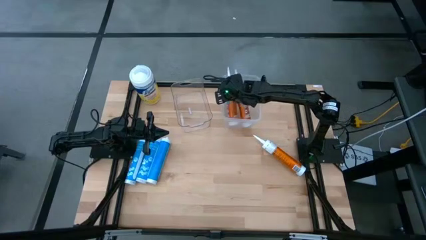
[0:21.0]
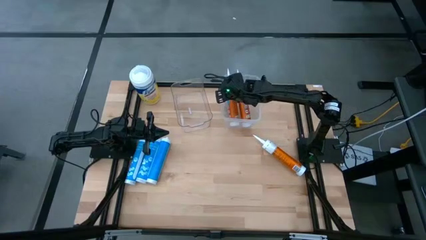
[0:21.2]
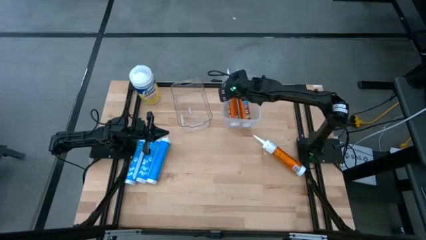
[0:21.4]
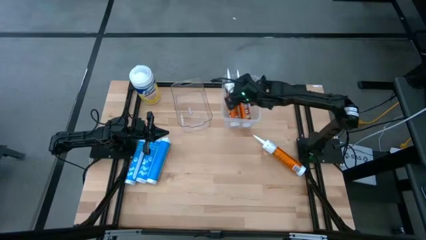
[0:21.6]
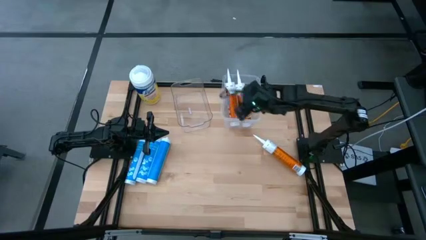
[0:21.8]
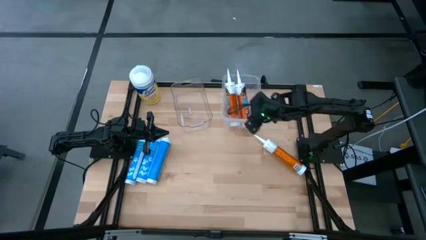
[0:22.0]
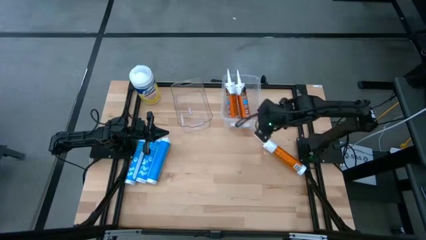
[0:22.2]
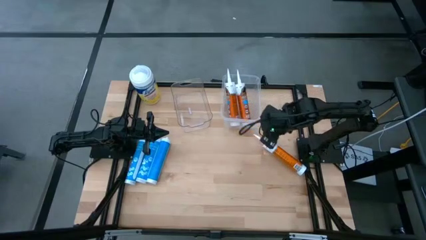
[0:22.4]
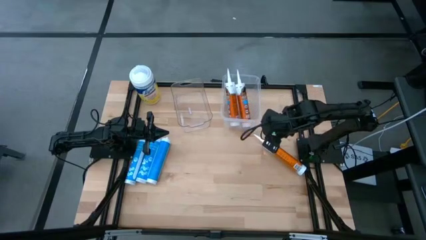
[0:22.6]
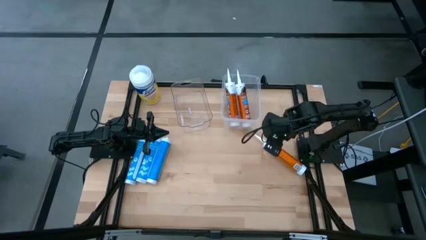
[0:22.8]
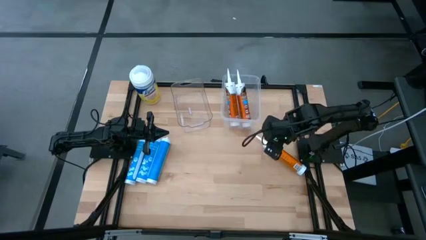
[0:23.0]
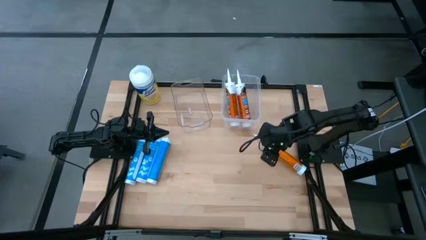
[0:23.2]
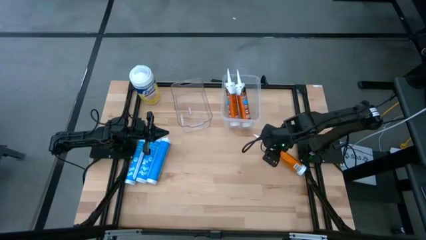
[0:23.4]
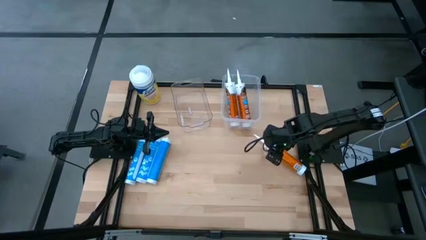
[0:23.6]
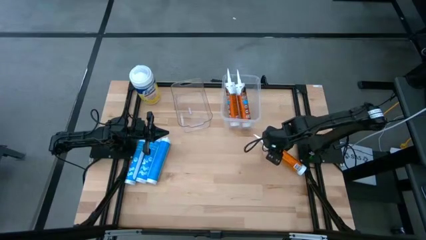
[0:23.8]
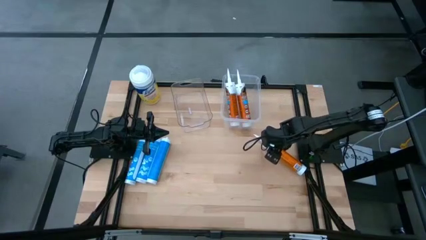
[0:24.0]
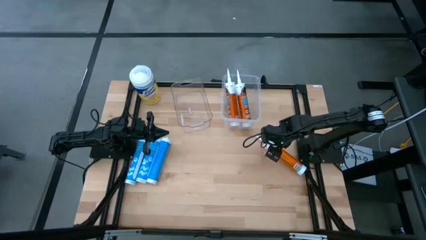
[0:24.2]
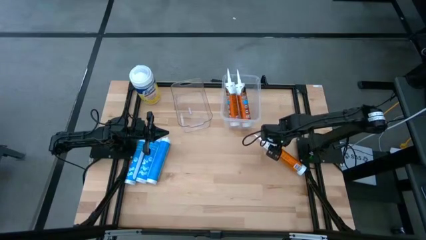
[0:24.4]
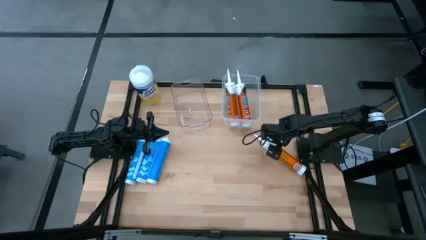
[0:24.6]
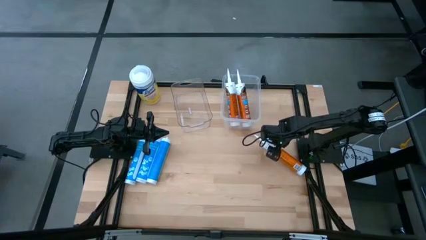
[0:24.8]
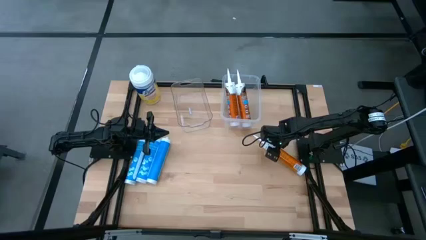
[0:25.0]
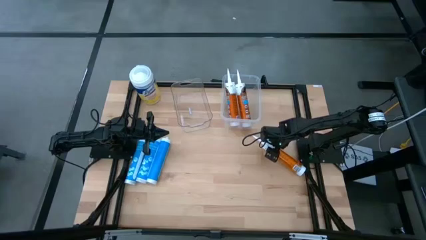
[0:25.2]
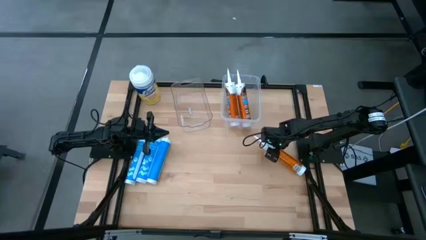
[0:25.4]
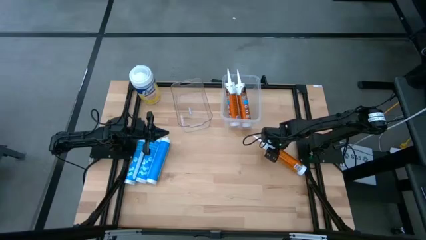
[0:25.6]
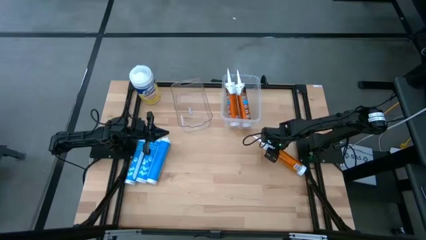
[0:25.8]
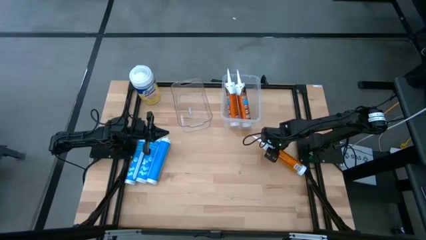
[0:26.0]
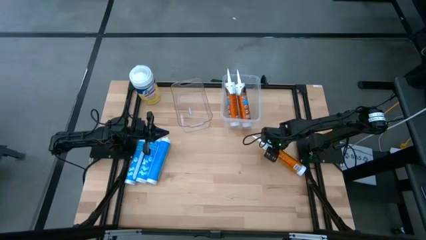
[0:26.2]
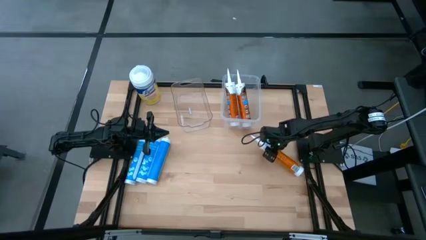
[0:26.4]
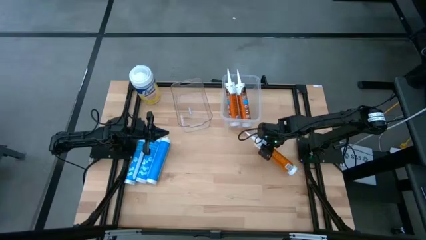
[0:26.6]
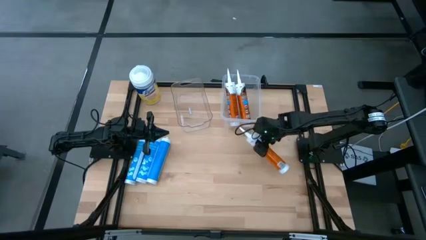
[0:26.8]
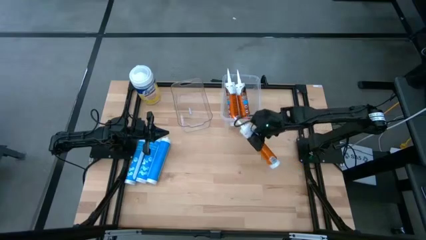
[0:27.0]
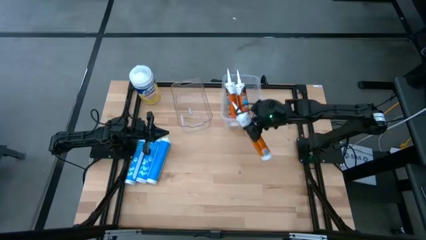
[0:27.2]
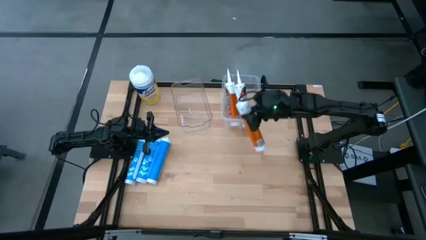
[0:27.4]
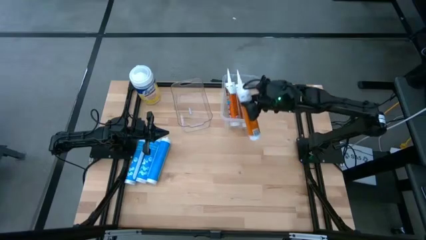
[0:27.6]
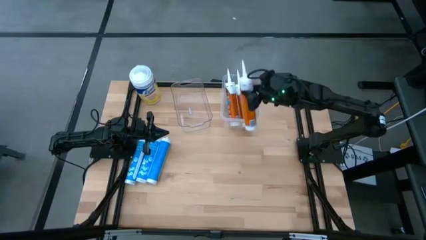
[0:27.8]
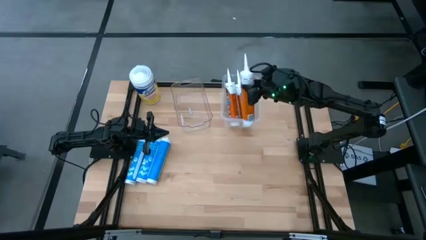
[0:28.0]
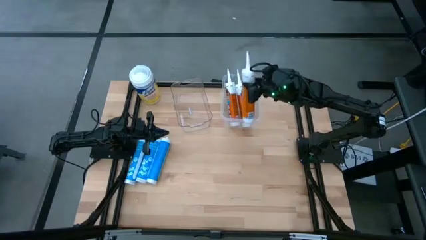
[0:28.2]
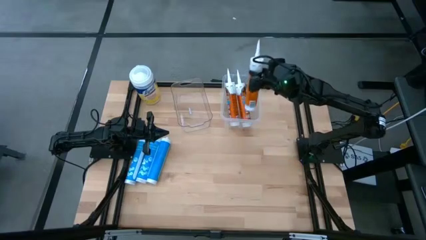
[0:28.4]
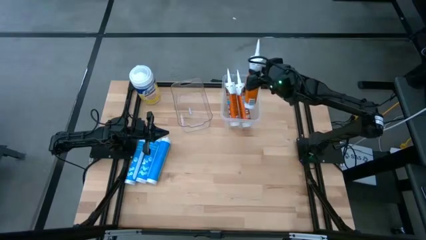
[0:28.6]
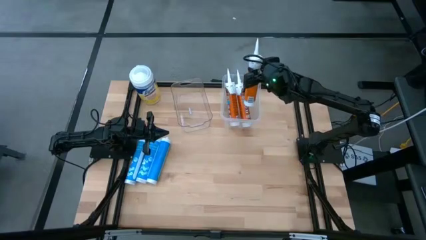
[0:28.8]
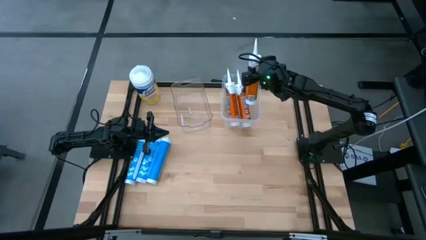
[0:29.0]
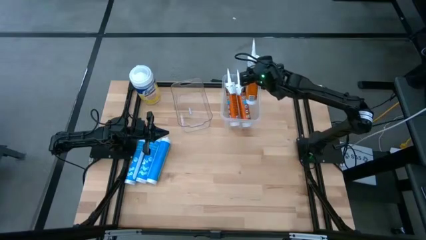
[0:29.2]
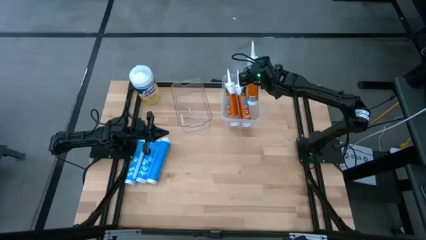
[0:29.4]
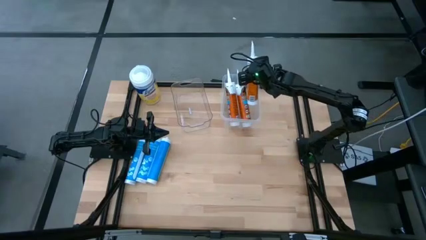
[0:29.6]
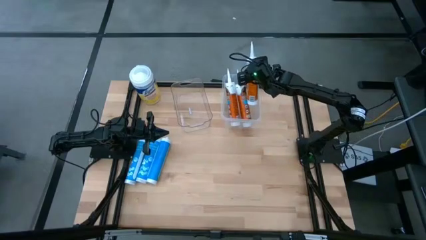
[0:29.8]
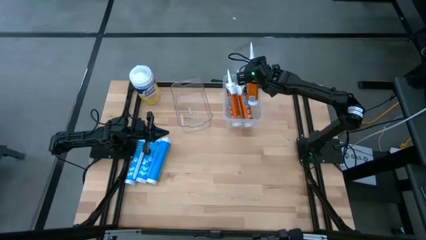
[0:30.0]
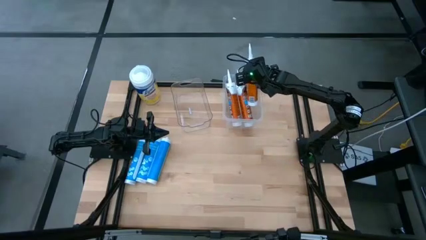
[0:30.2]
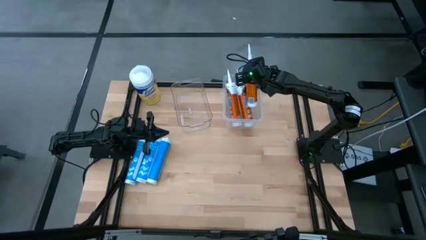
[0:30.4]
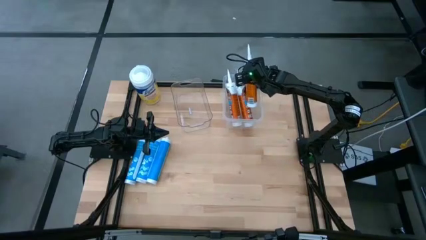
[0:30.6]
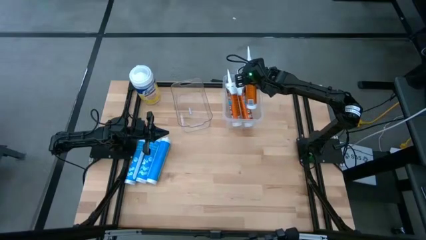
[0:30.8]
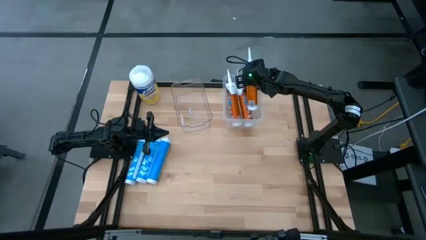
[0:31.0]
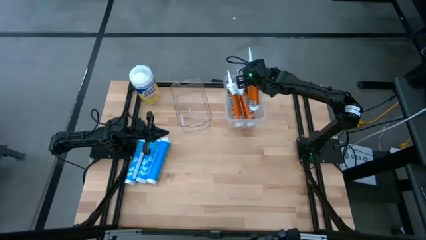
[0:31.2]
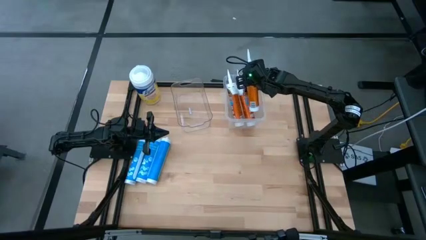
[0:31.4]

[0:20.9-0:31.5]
Task: Pick & place silicon tubes, Sealant and Lysol wipes
Put the orange sealant into the right transparent bin
